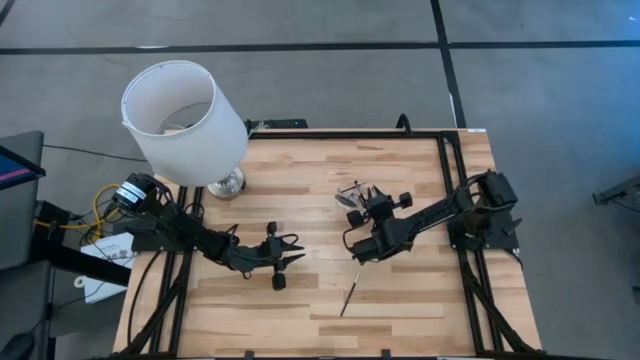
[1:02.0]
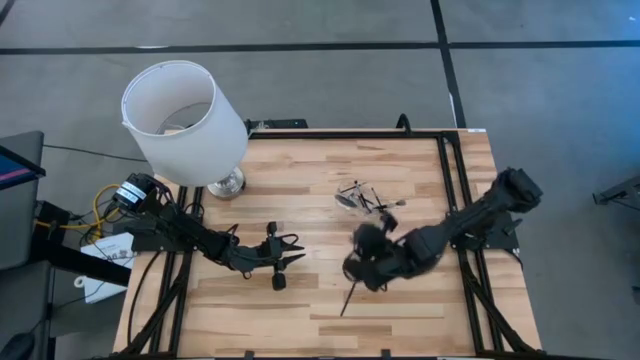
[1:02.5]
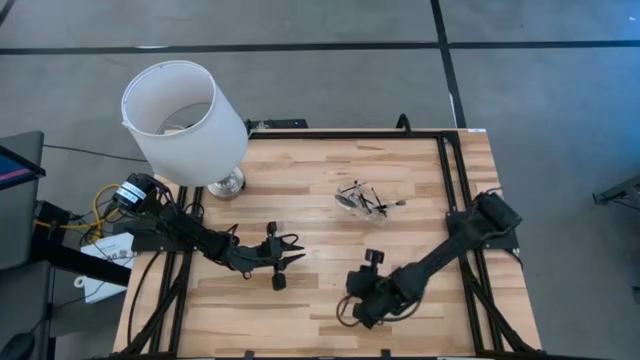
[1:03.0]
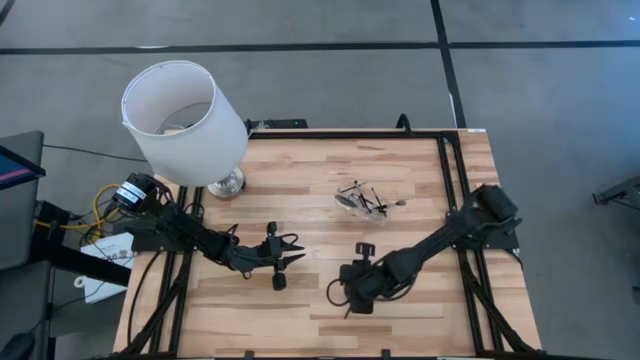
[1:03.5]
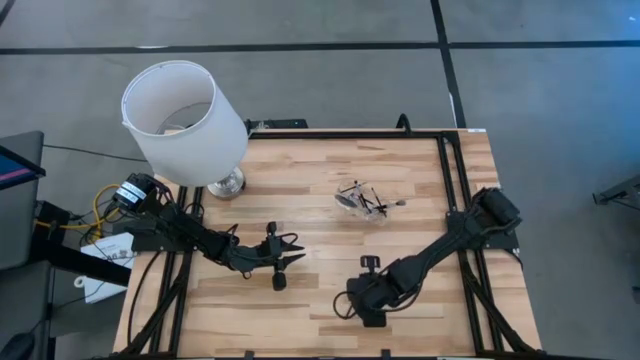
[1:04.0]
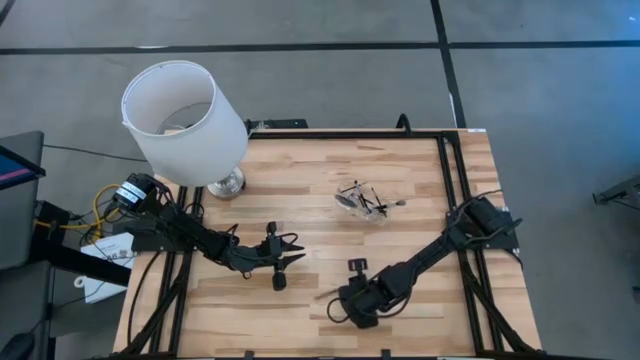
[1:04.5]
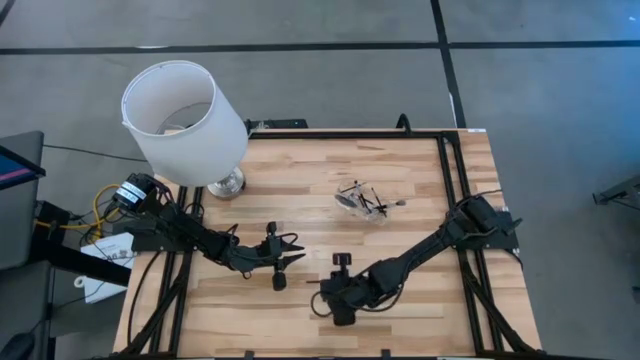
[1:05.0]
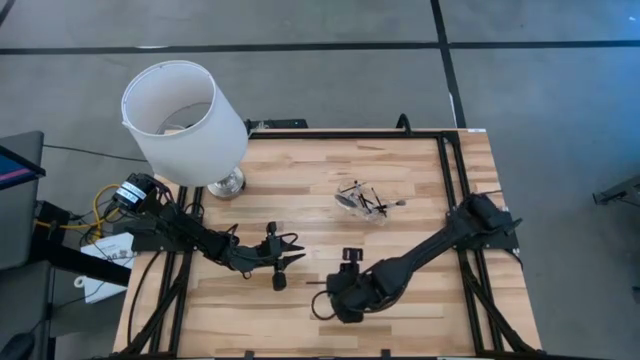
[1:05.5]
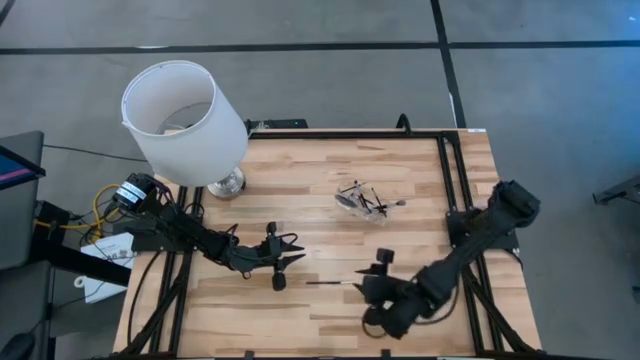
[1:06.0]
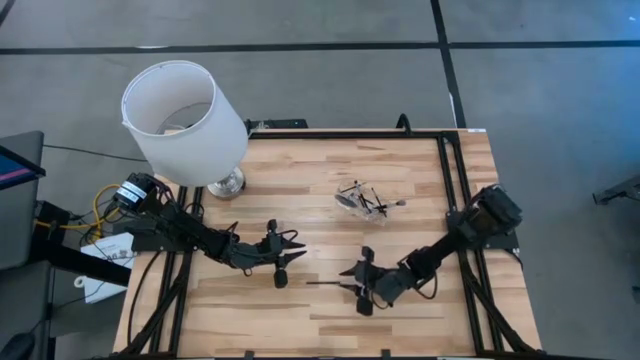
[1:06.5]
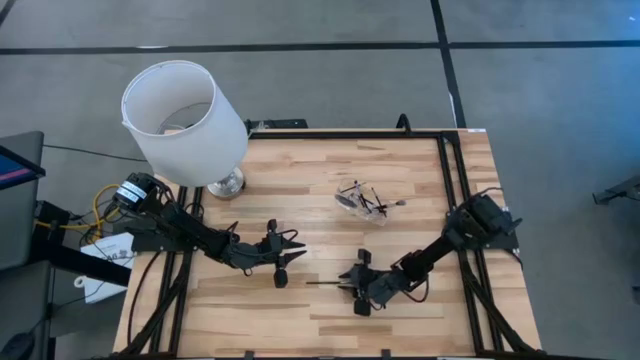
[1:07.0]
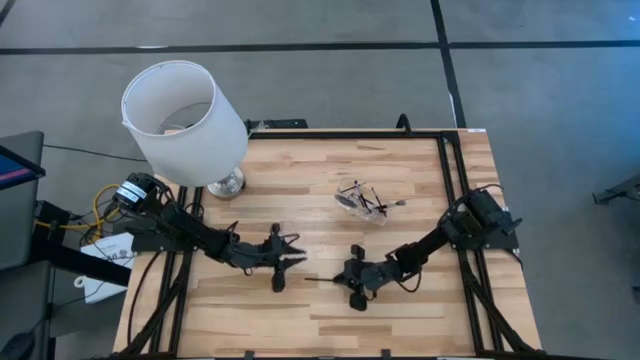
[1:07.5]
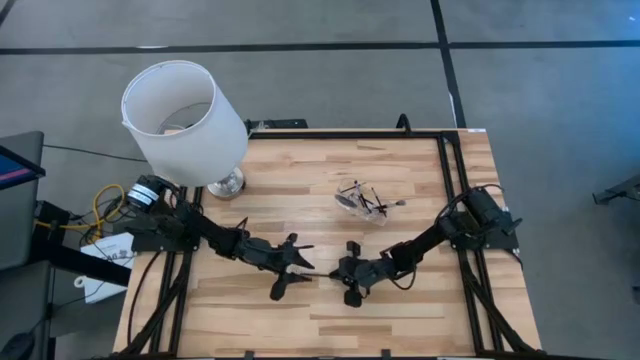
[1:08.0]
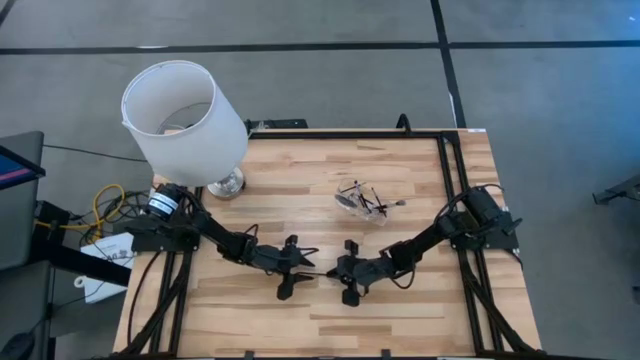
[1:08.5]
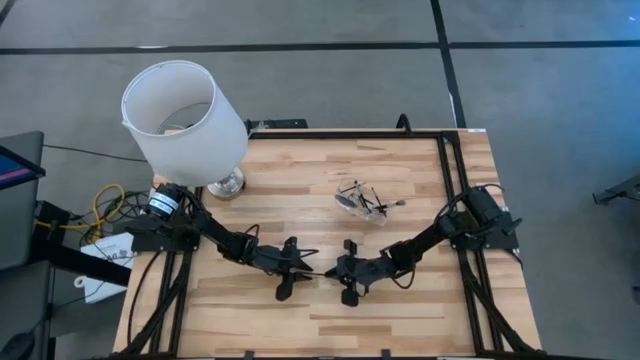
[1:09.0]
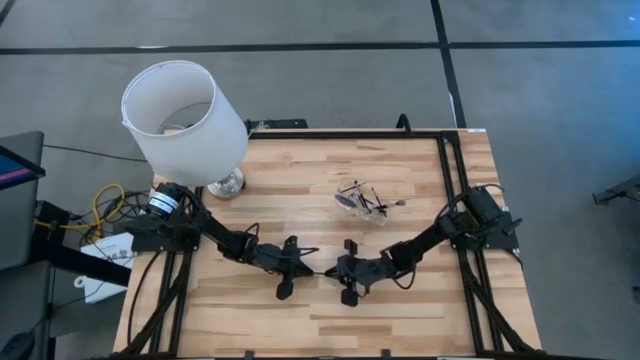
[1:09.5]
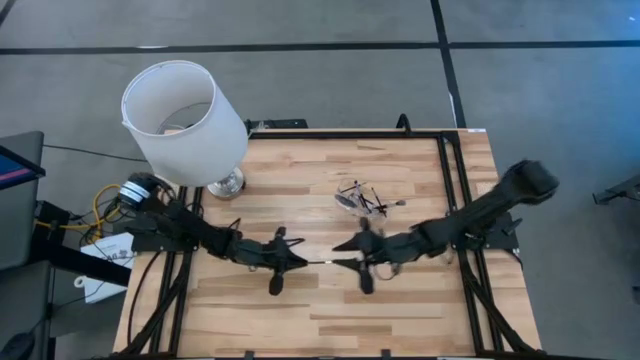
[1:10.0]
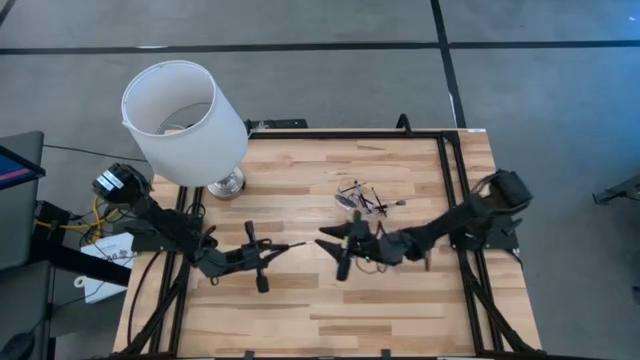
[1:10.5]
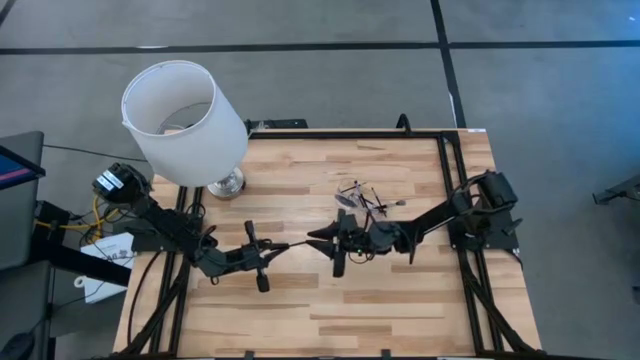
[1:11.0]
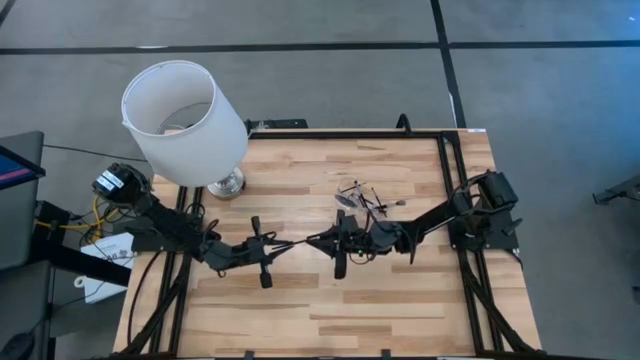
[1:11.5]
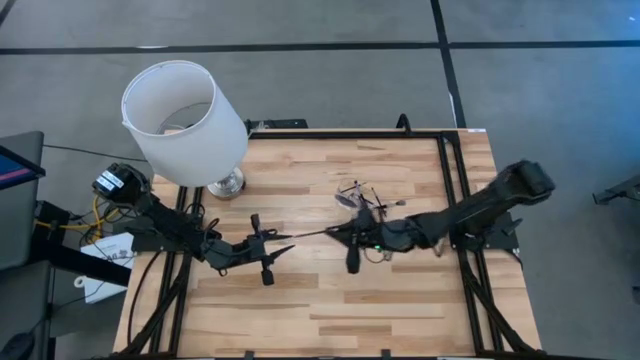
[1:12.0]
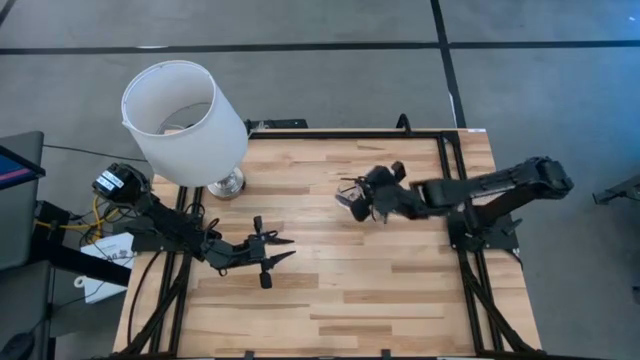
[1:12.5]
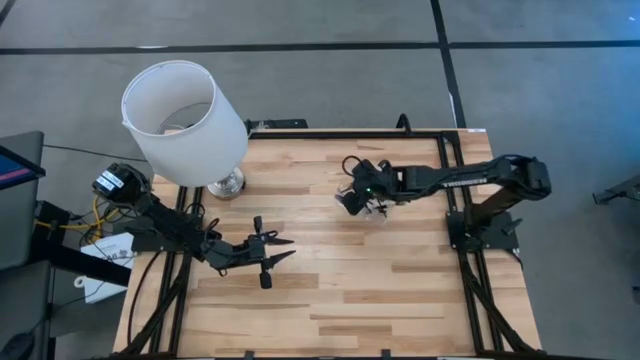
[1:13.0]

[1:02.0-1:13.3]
Task: Put items in baskets/containers
Put the black eyeshadow brush into the transparent organizer

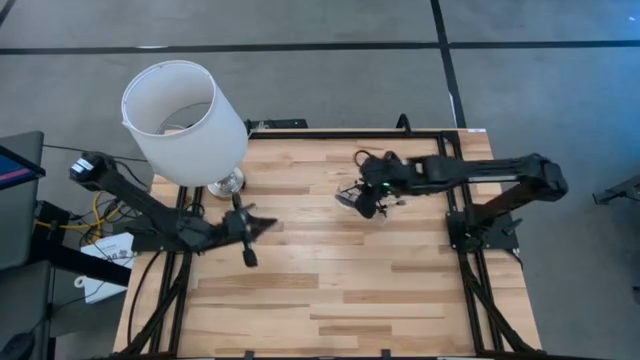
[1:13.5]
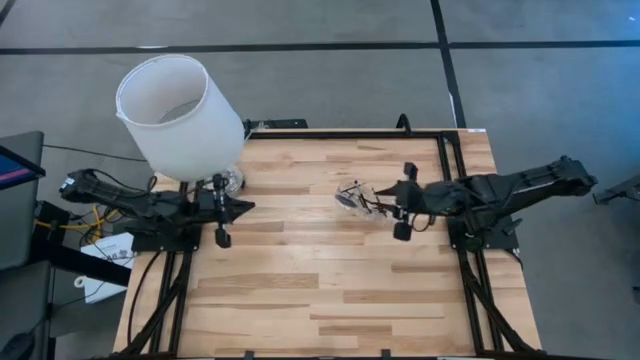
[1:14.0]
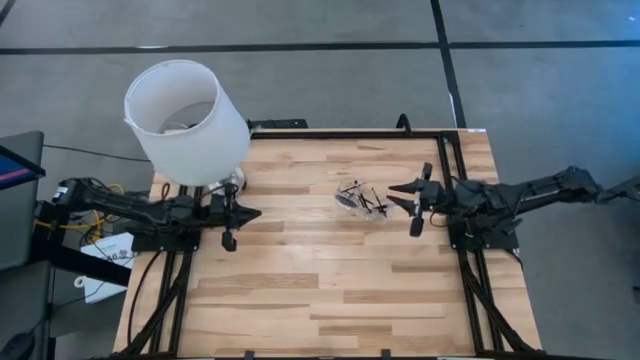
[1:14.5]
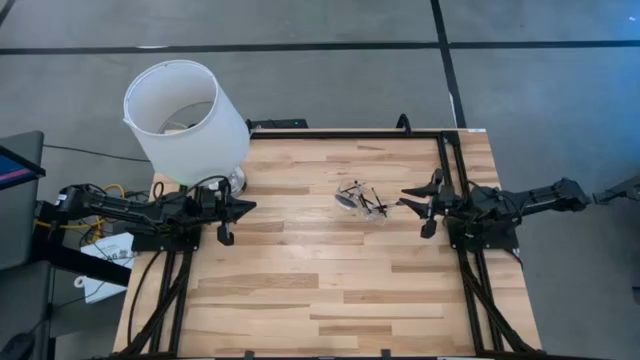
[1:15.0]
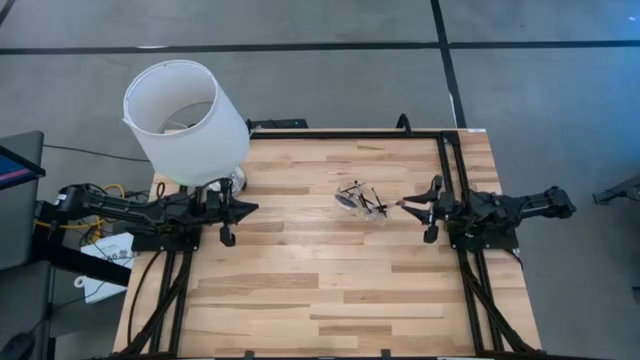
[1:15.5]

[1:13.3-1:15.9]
Put the black eyeshadow brush into the transparent organizer

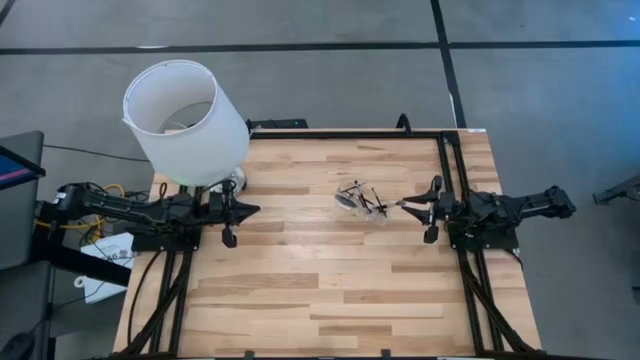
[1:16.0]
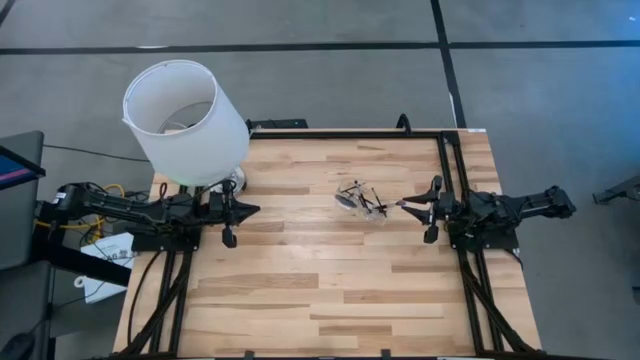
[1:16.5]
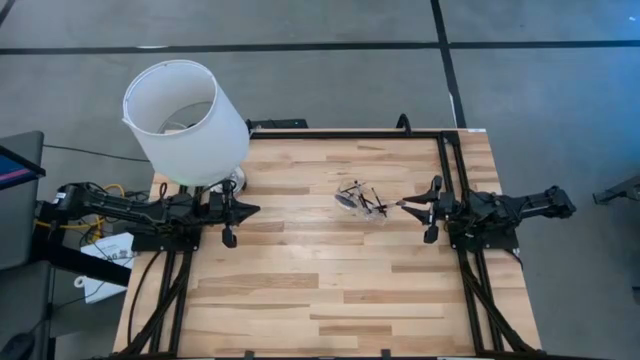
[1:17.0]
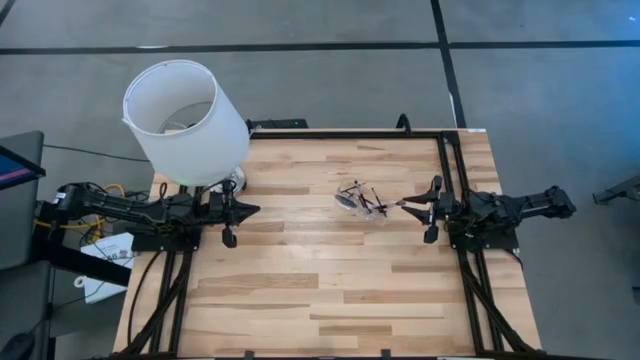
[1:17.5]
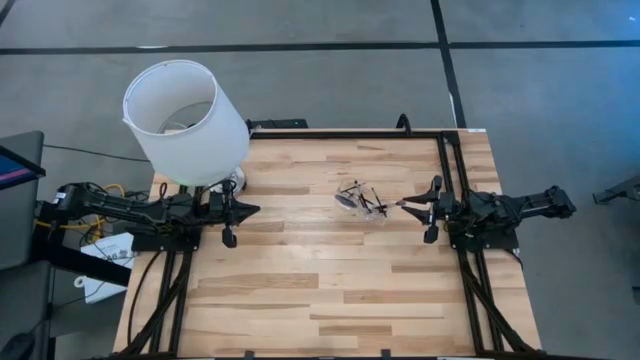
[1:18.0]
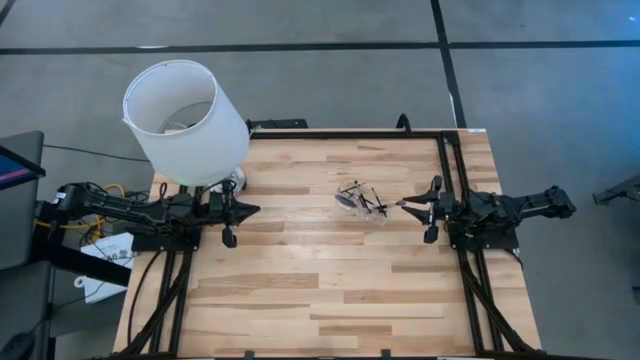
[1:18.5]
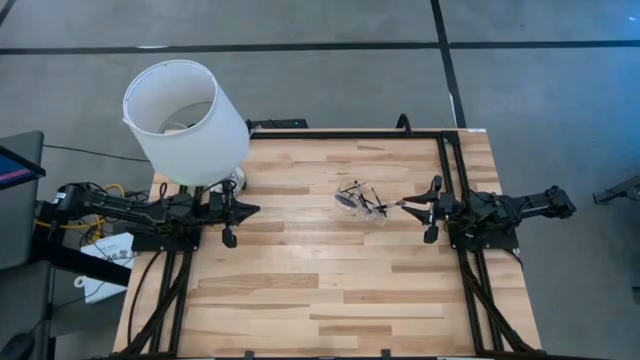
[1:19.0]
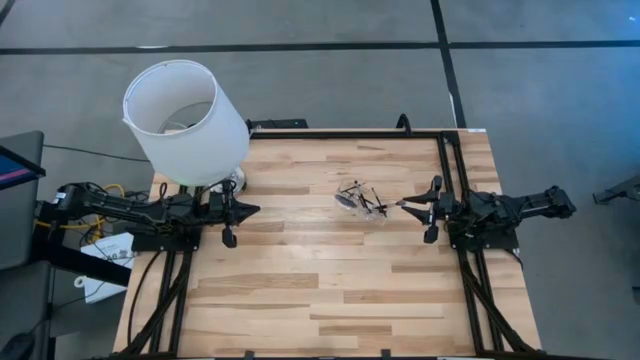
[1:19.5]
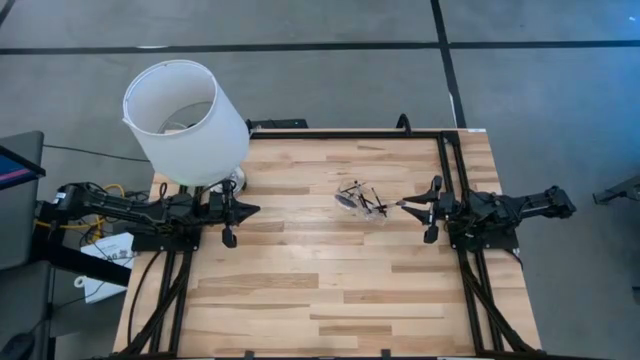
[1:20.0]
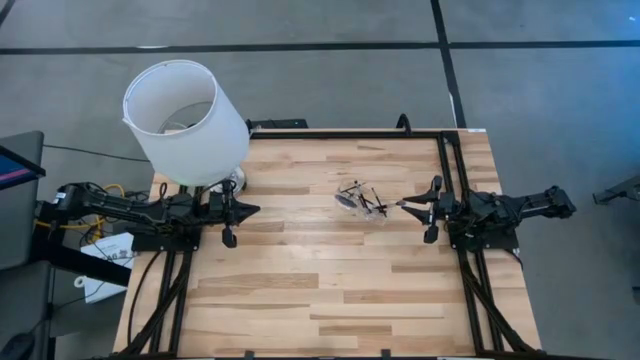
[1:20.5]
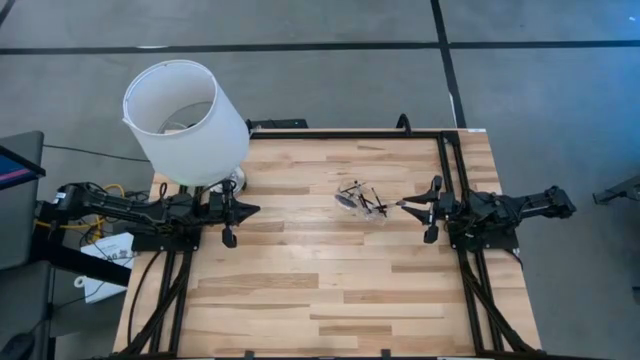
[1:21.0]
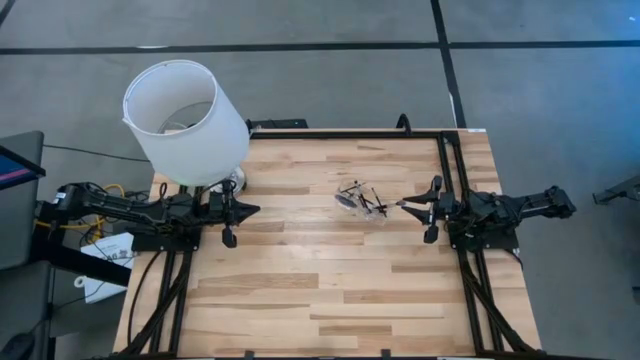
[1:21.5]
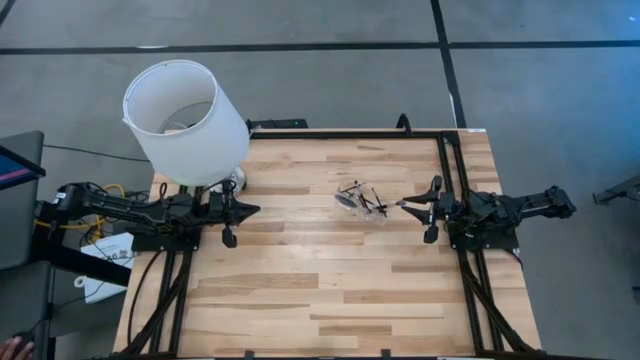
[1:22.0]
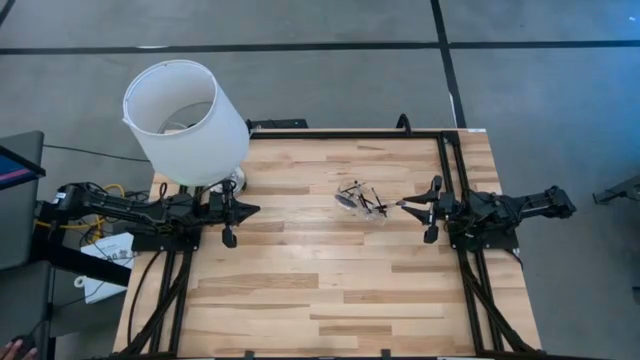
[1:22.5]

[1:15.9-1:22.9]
Return to Home Position
